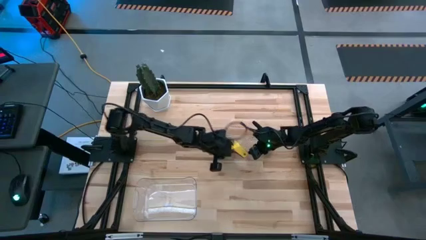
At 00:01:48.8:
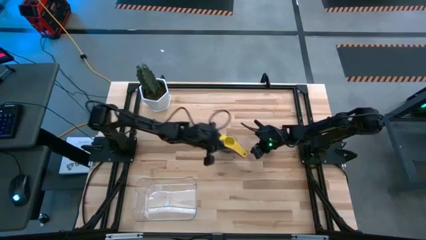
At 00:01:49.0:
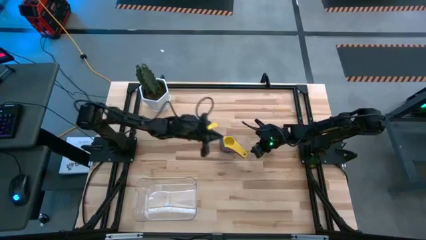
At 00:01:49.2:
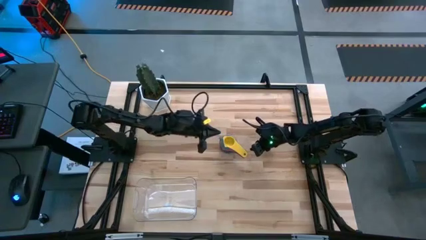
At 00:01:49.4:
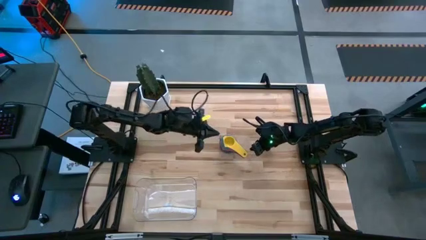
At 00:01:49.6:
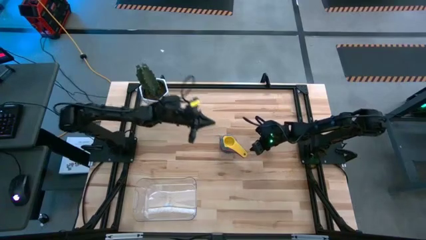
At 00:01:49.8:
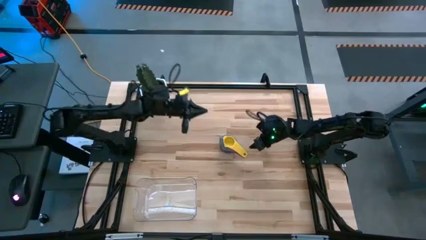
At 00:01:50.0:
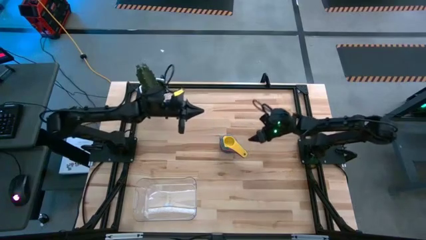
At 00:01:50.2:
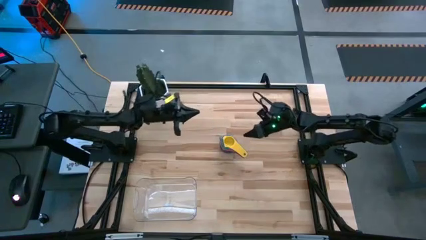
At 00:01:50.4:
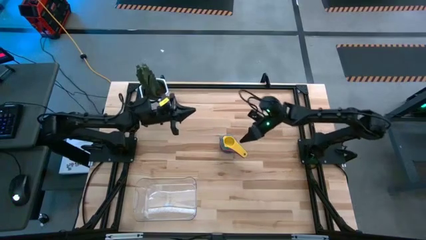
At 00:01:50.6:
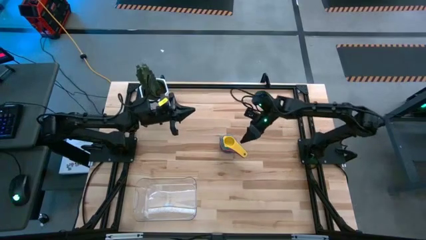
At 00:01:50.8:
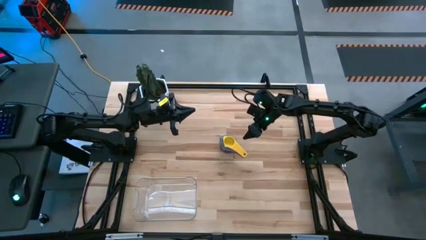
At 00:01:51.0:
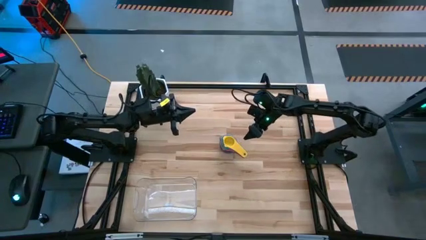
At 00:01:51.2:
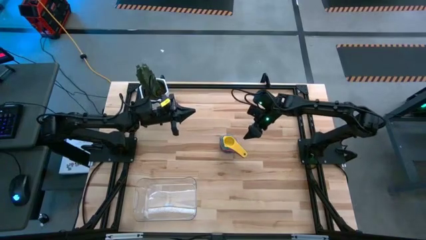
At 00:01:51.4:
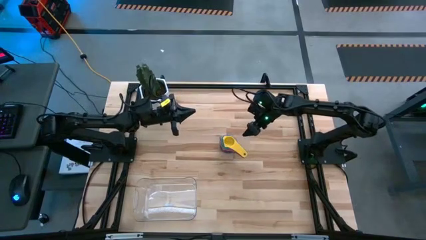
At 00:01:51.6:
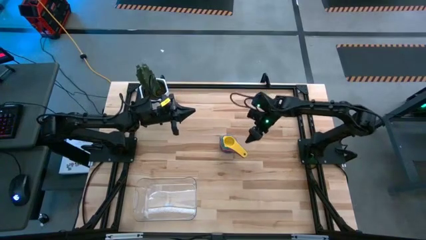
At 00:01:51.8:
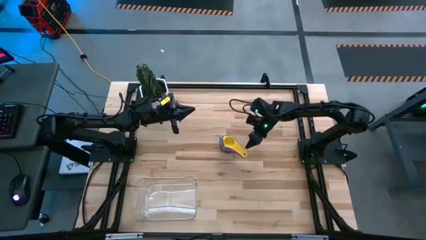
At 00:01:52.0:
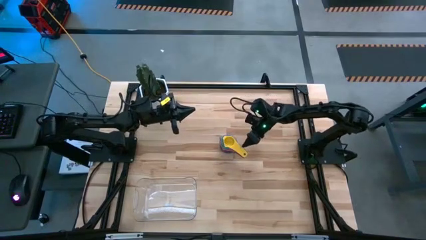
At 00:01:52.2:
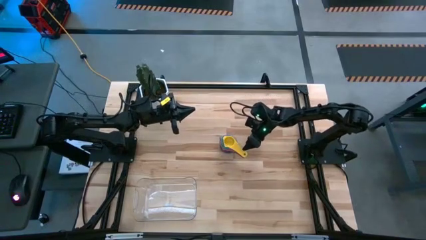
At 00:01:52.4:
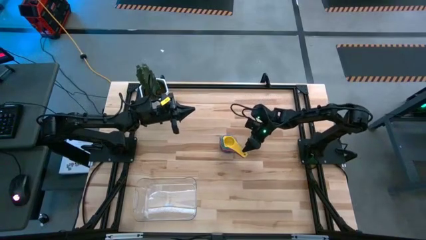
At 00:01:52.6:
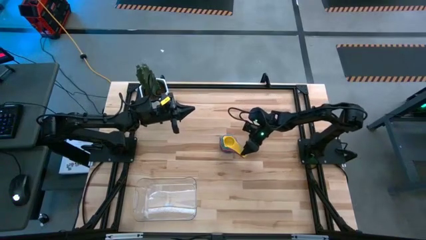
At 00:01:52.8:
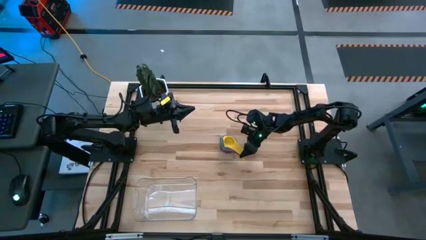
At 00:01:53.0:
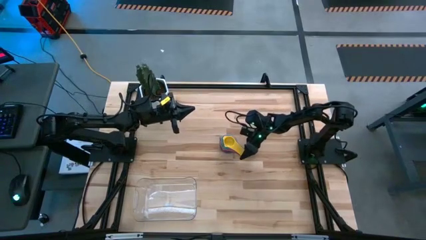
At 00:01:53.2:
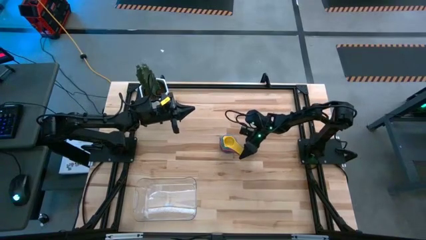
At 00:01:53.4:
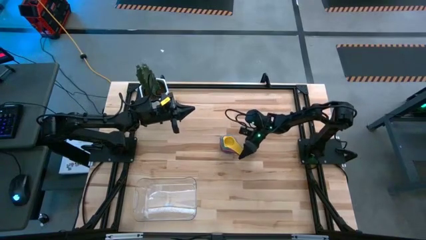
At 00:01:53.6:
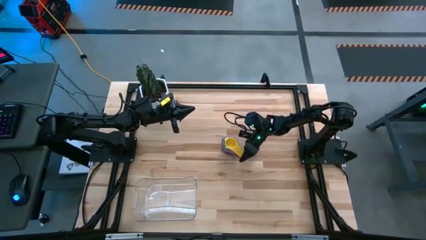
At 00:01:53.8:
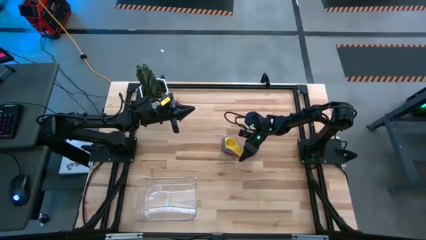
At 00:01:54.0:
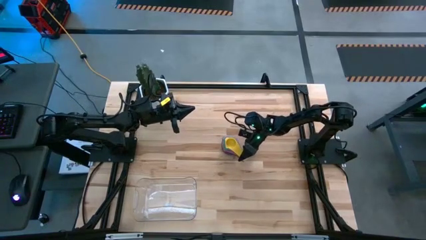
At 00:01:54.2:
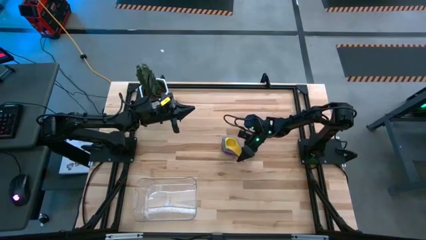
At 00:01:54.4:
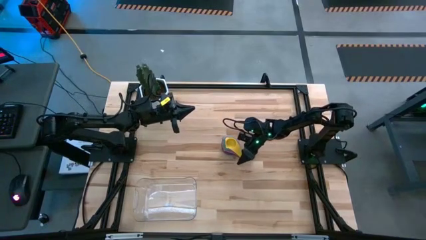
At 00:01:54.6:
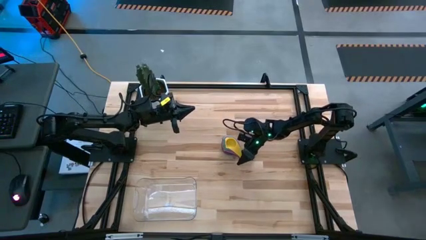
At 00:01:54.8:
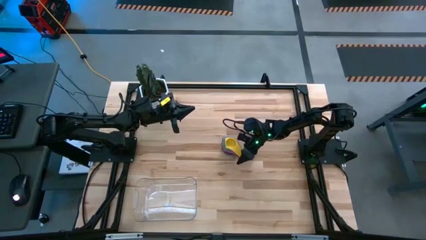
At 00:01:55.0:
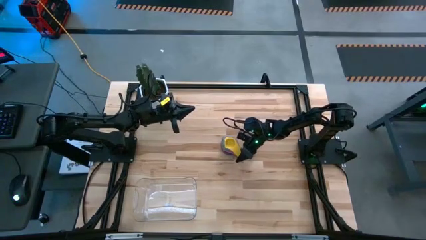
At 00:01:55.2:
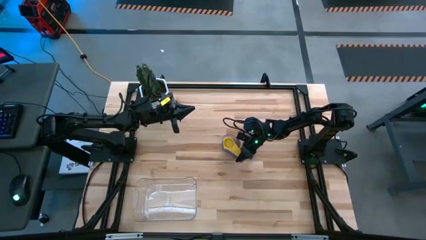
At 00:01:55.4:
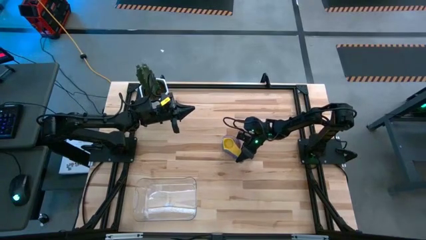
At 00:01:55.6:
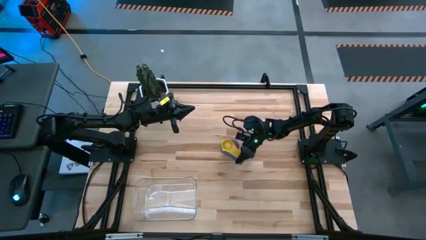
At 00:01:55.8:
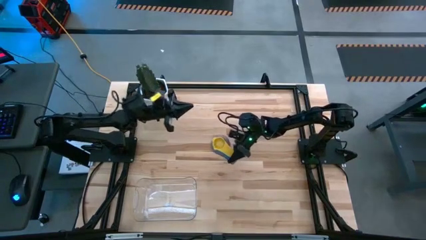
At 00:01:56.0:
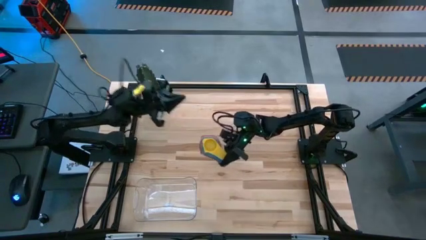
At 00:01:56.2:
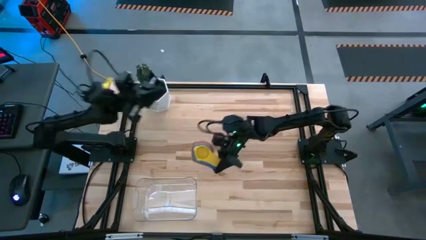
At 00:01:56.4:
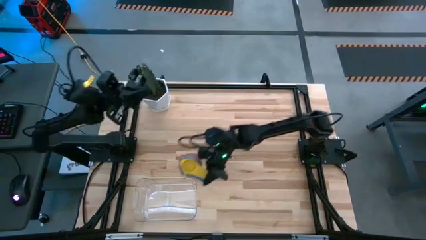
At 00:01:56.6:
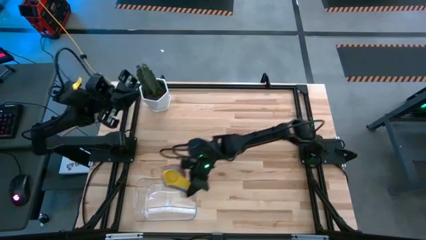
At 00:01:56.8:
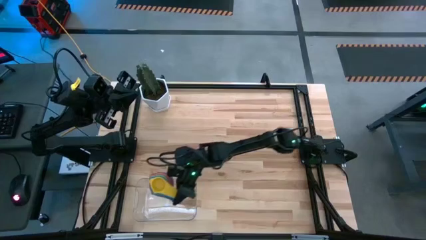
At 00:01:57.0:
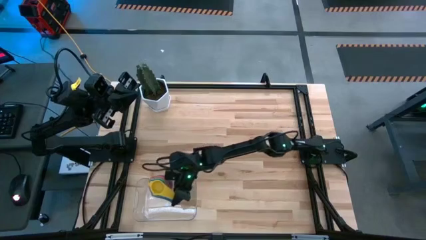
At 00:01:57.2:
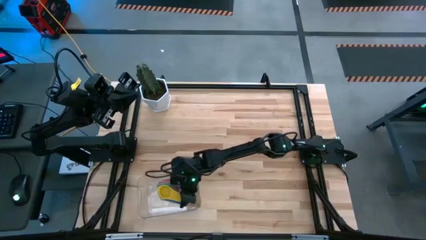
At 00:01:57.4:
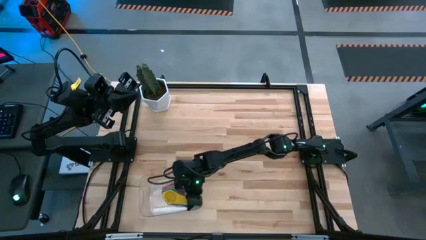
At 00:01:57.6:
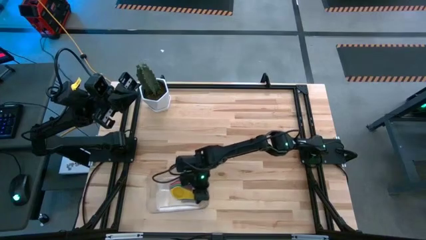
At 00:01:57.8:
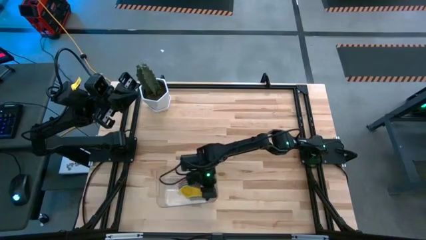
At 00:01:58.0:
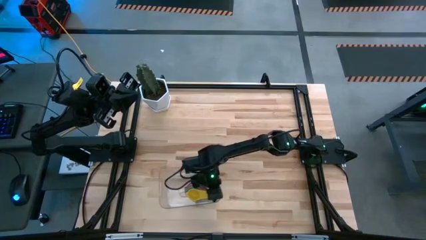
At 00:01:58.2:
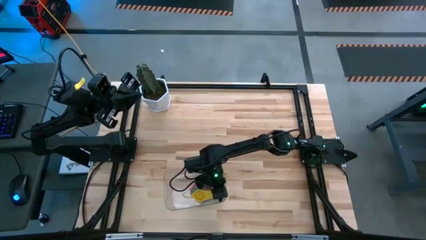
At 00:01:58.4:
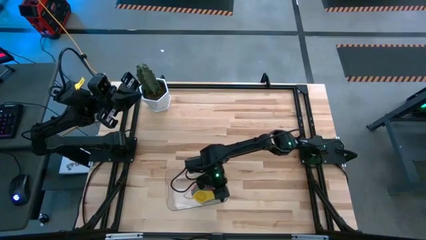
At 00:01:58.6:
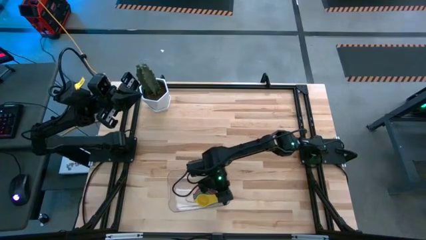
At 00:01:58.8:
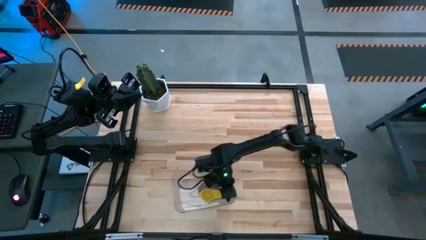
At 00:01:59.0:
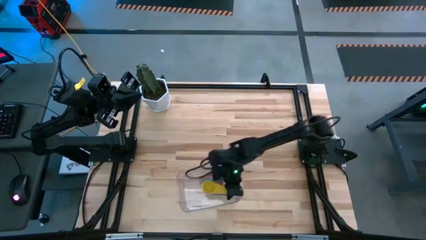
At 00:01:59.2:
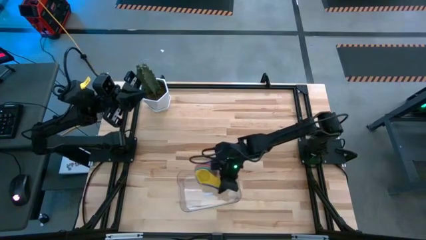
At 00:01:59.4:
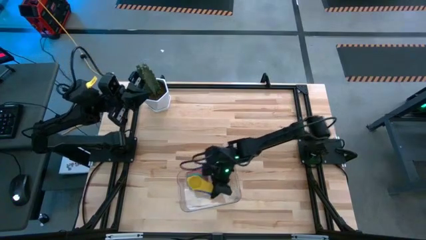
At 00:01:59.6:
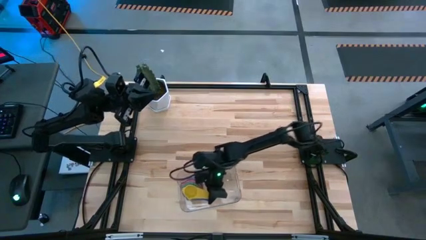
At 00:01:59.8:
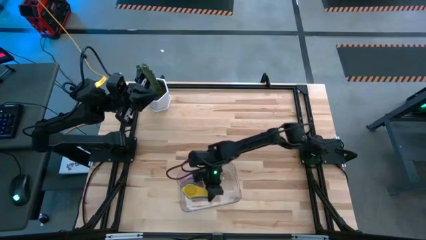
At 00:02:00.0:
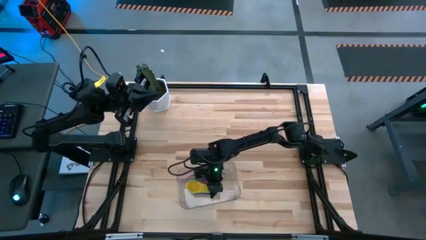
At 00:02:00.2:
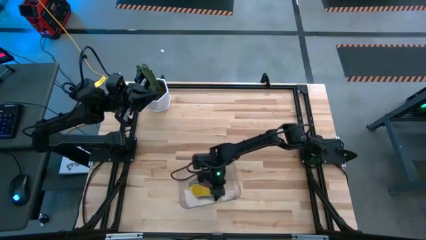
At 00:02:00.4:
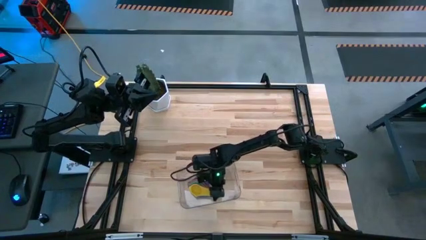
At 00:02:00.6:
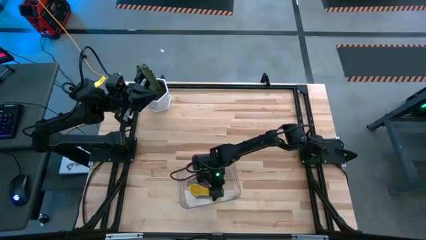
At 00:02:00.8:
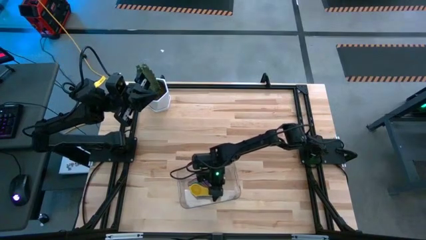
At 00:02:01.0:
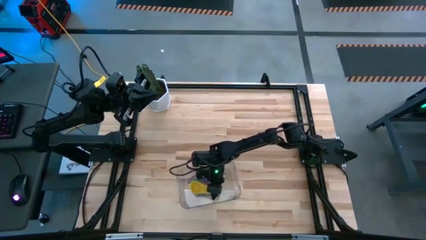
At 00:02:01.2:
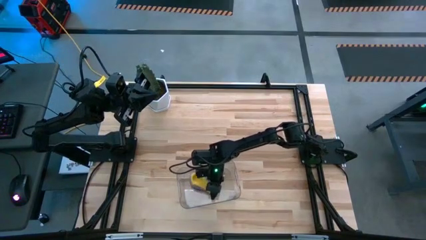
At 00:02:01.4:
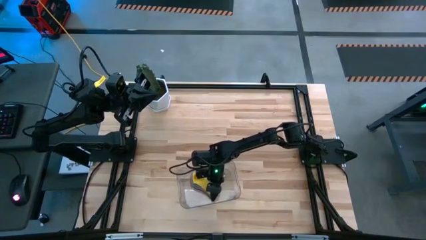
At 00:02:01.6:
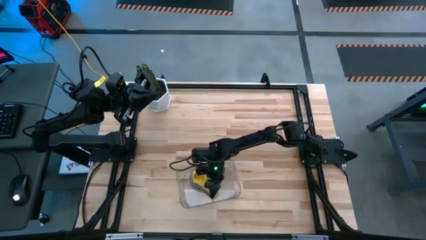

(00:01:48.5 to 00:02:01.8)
Task: Nest measuring cups in basket
Put the nested measuring cups into the transparent bin
